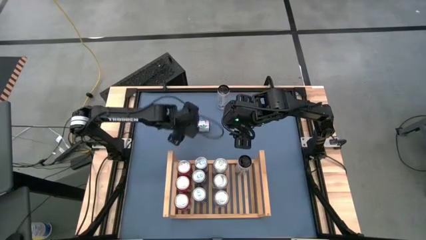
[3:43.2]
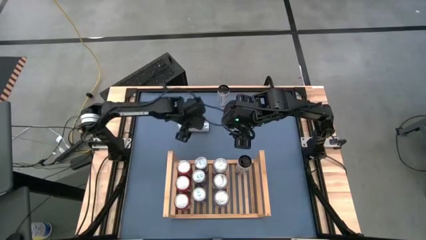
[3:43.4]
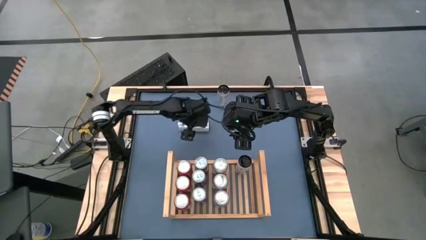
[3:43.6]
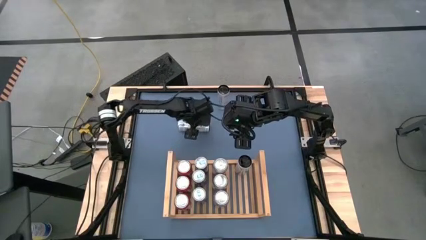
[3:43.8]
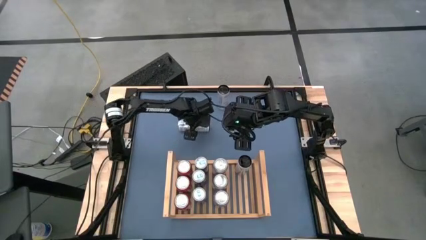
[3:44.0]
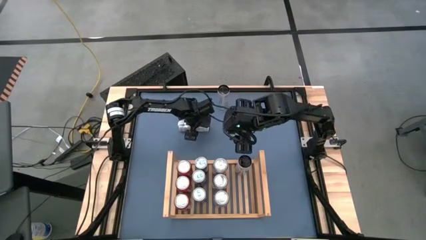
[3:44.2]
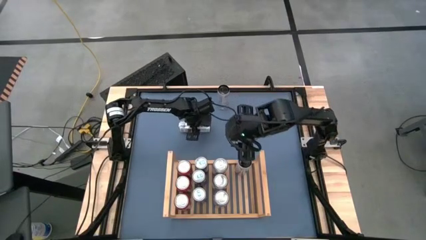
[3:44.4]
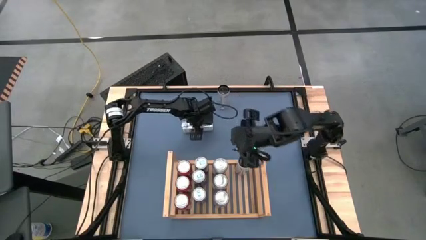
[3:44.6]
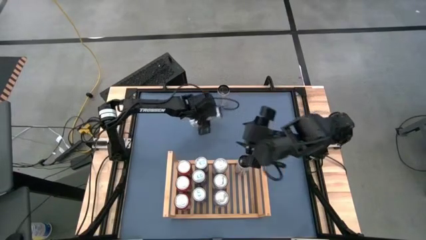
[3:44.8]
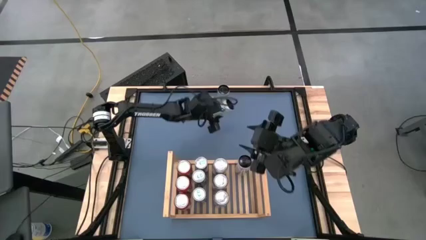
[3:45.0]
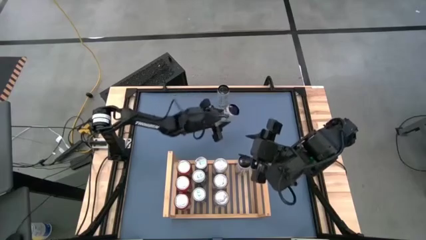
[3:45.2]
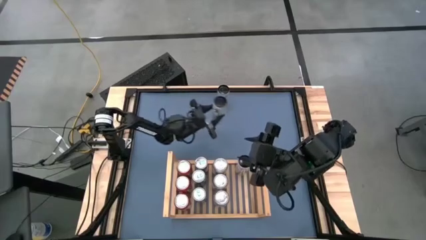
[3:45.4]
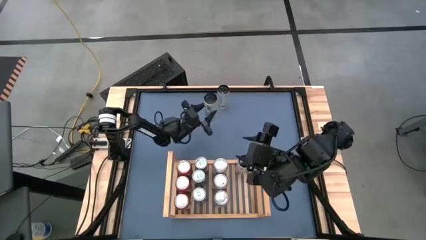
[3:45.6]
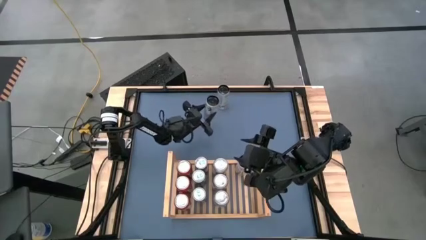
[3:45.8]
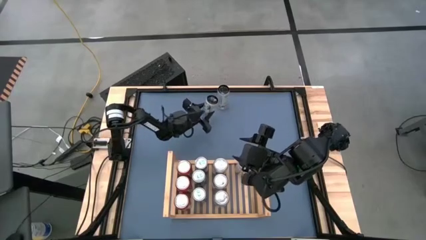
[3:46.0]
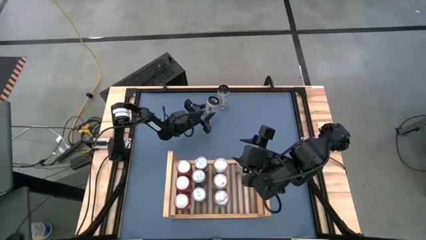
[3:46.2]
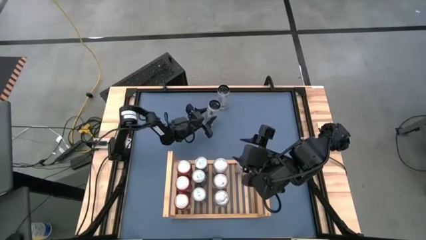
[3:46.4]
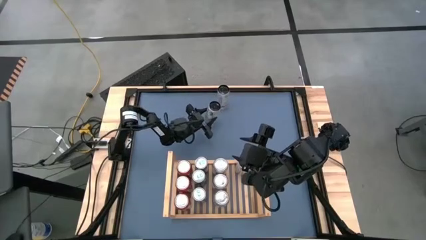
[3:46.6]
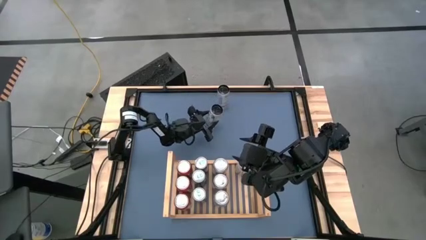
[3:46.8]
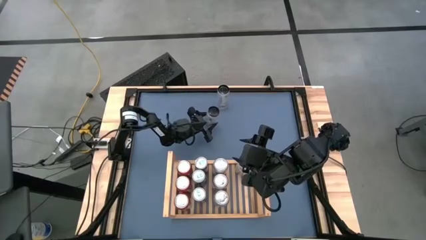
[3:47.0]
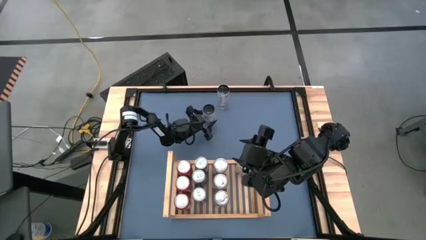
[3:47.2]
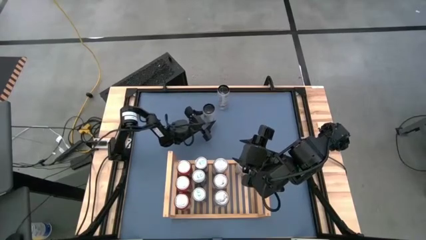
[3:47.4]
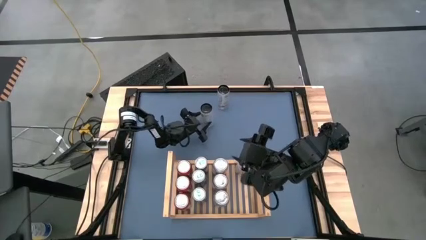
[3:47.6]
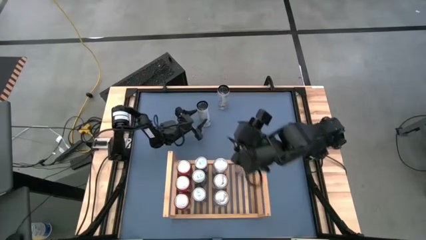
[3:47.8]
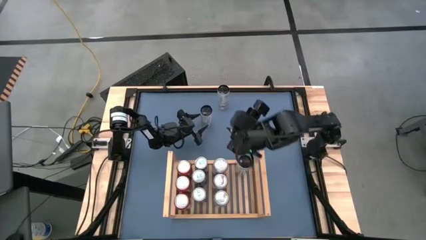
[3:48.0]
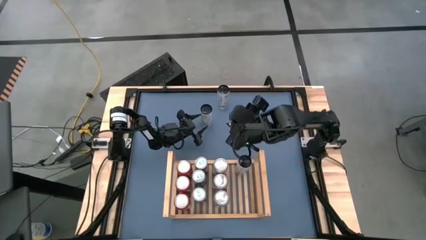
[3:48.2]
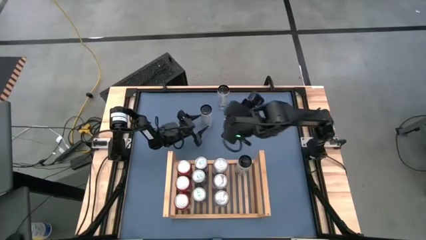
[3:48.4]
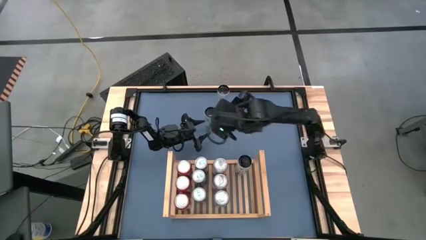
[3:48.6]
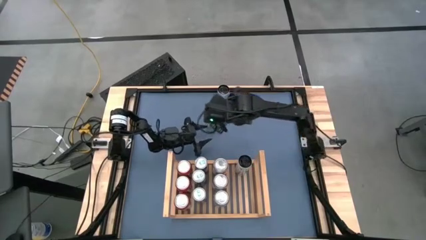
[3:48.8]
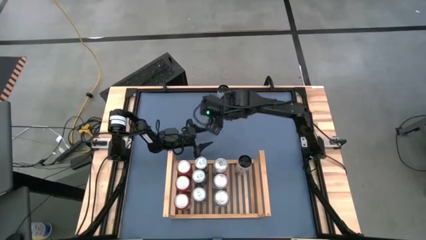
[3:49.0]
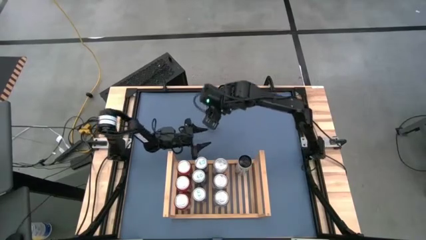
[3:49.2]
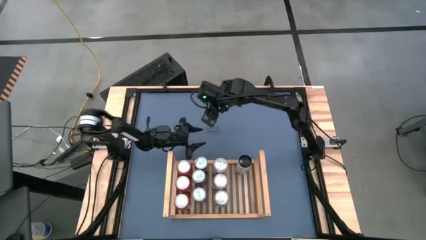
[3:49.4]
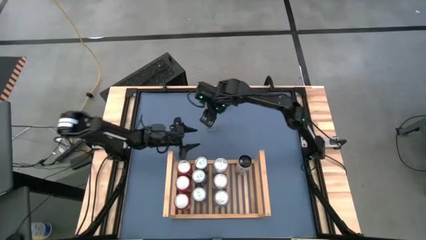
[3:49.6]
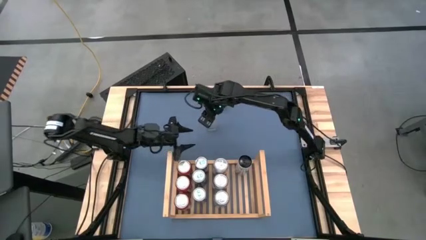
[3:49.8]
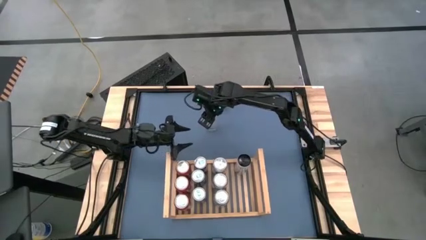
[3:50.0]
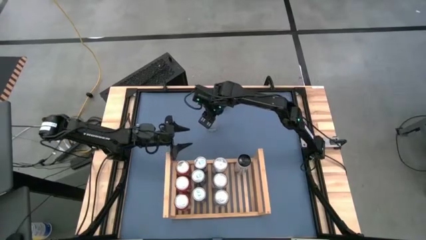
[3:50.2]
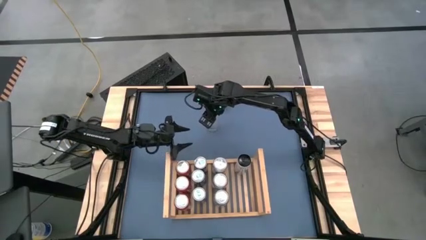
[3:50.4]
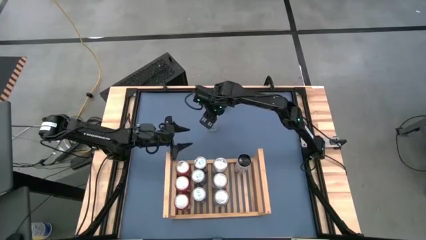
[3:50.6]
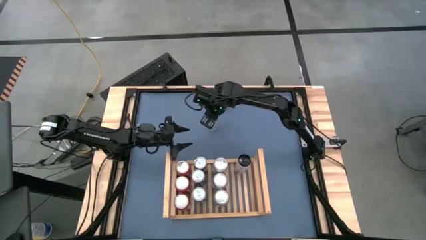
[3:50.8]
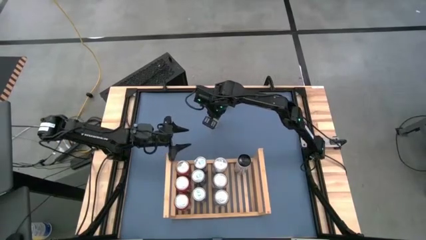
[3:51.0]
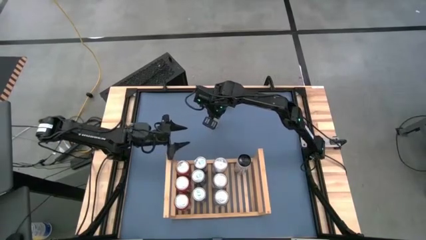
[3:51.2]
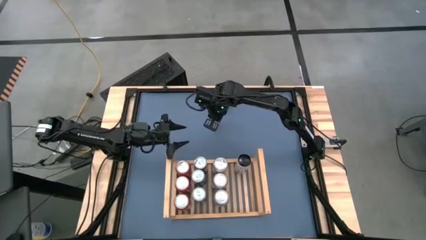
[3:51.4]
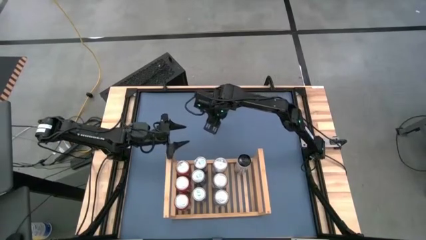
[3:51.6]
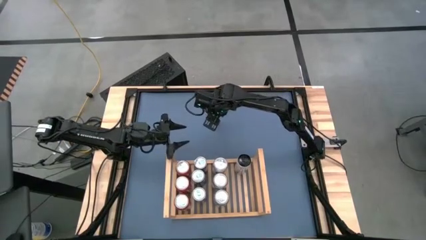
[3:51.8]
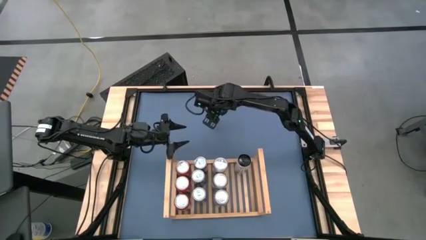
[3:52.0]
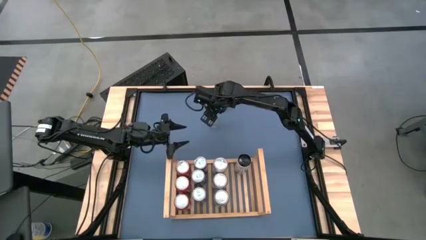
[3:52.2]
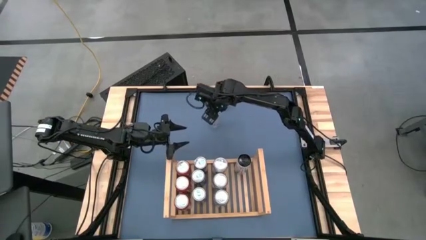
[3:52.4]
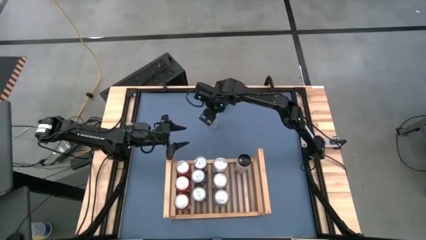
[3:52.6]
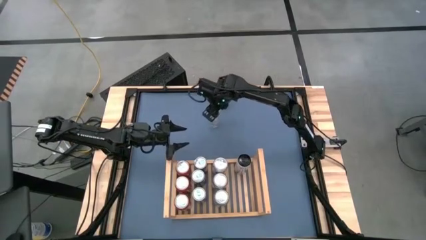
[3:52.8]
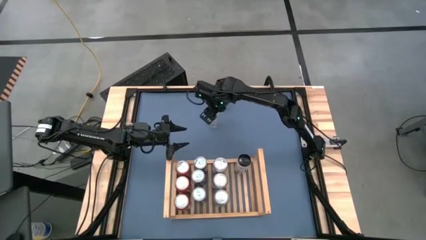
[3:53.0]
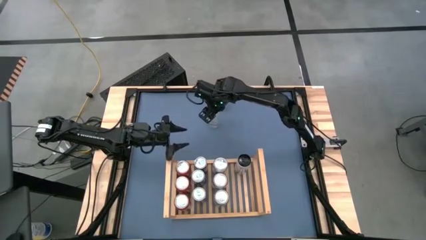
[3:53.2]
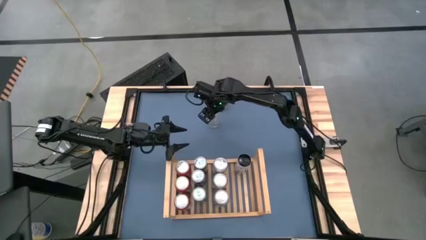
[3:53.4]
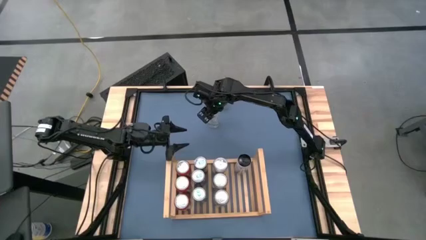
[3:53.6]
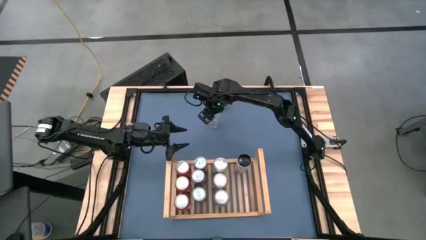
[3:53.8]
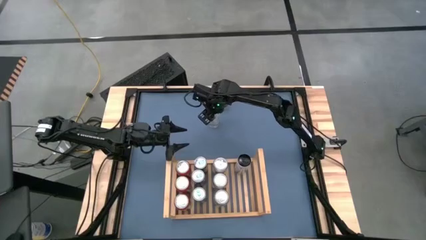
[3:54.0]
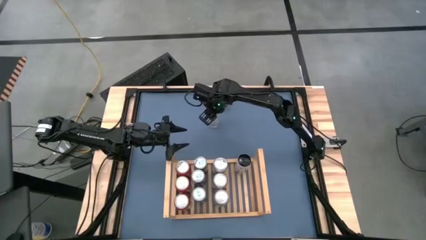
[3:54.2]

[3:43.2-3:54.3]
Task: Place canned beverage on shelf
Put the white-pink soda can on the shelf aligned with the other white-pink soda can
